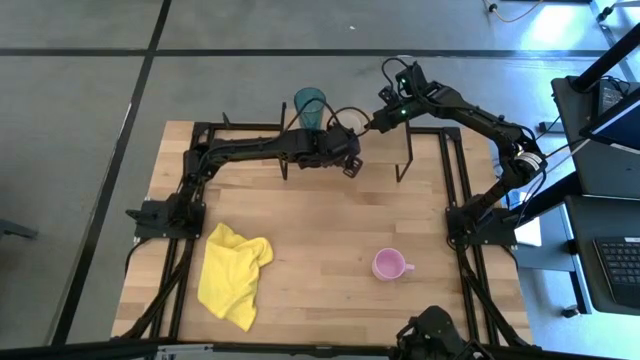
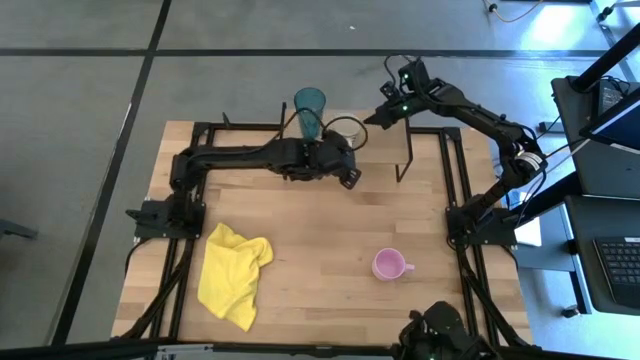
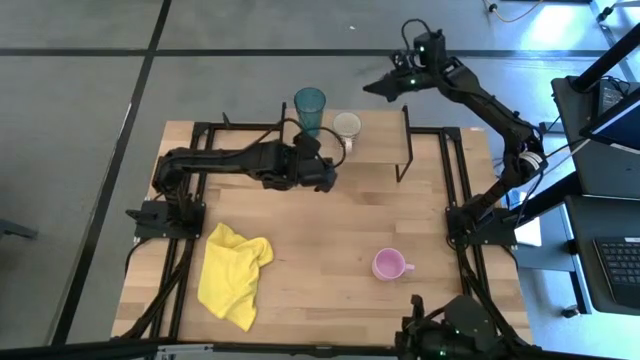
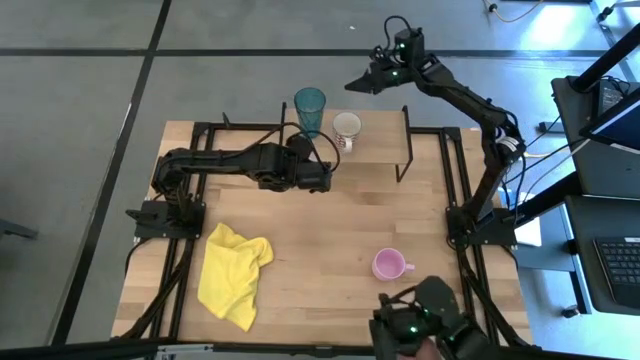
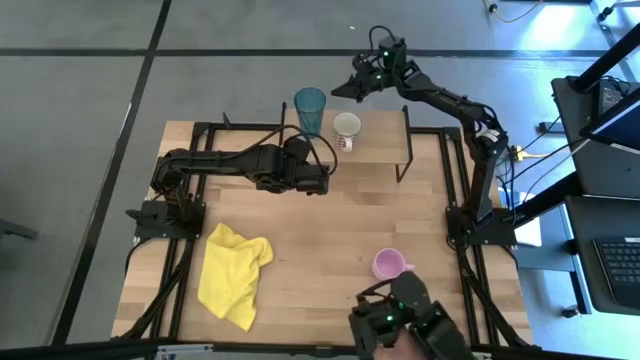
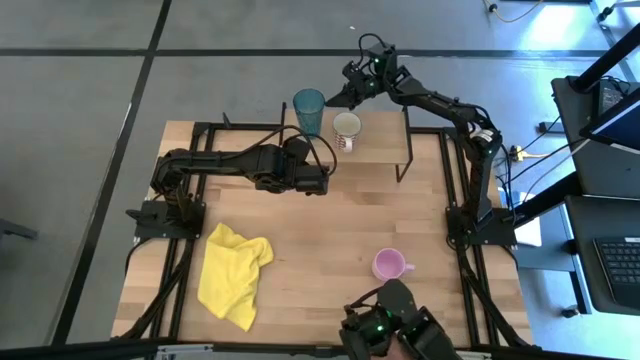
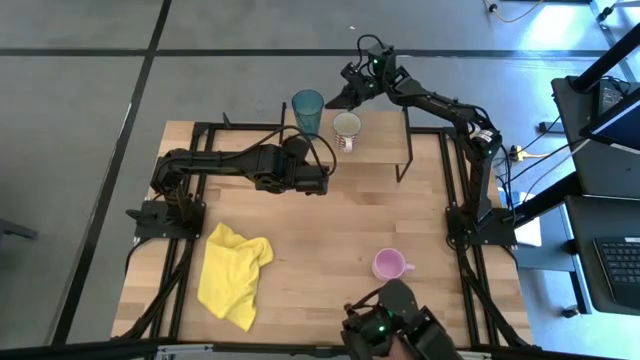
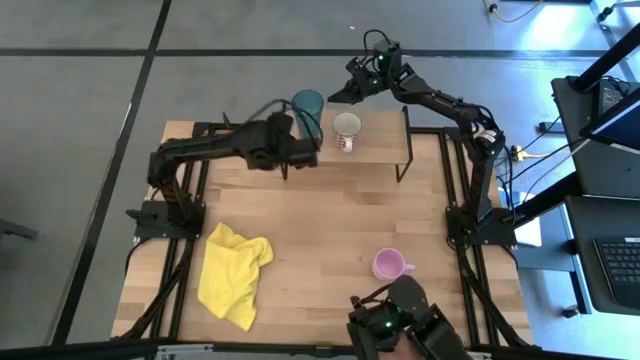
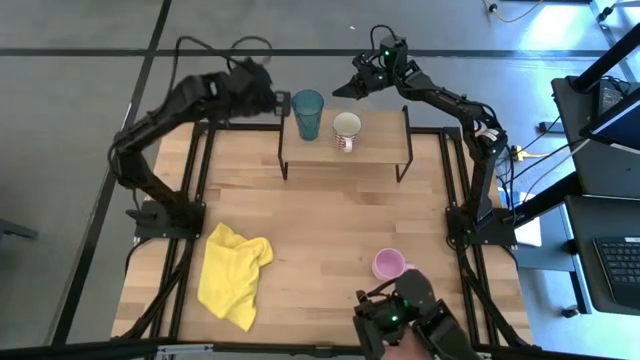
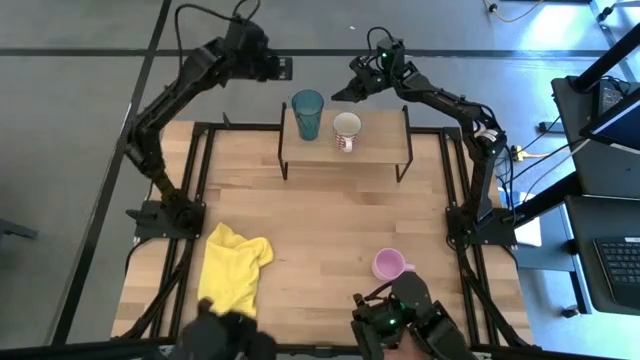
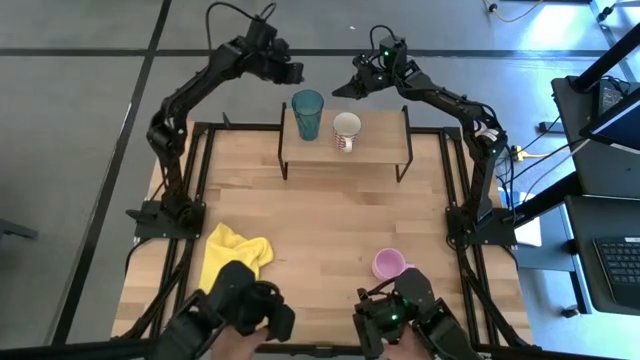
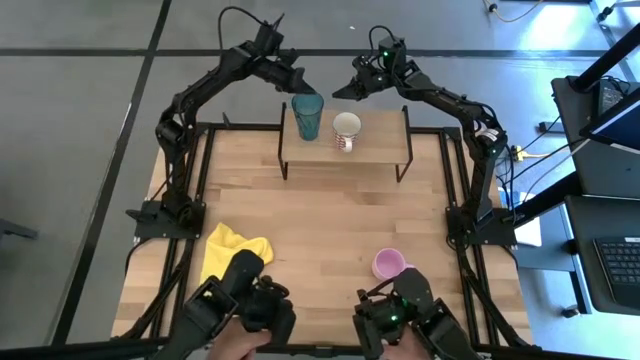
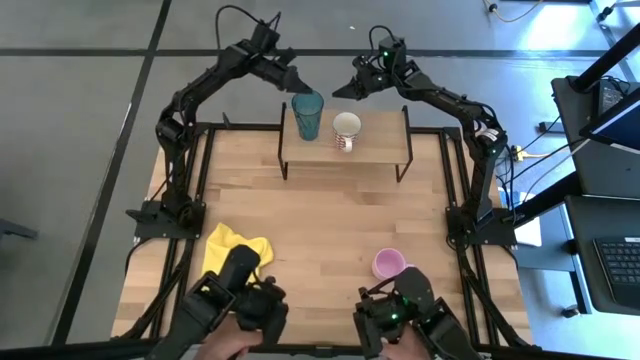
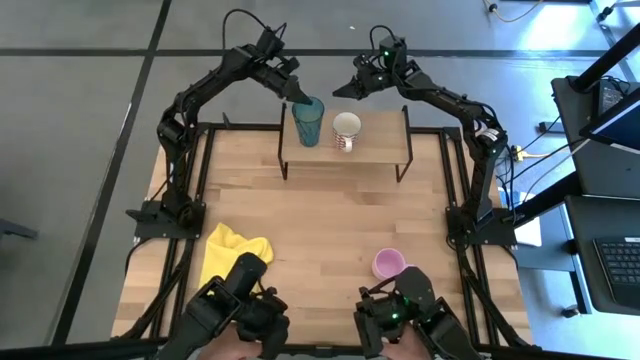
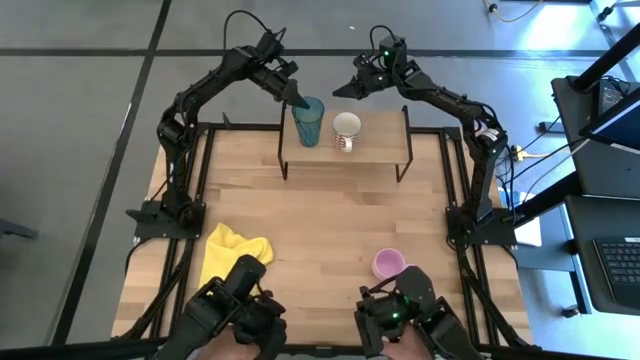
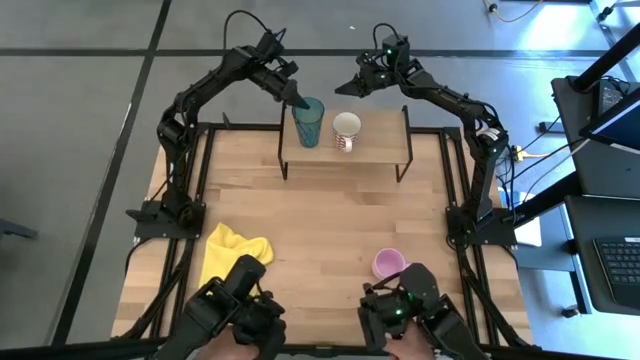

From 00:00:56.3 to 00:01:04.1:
Task: Stack small to large cups/mugs on shelf
Adjust the blue cup on the shelf

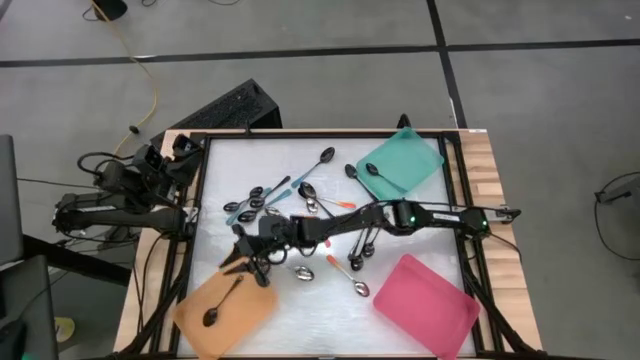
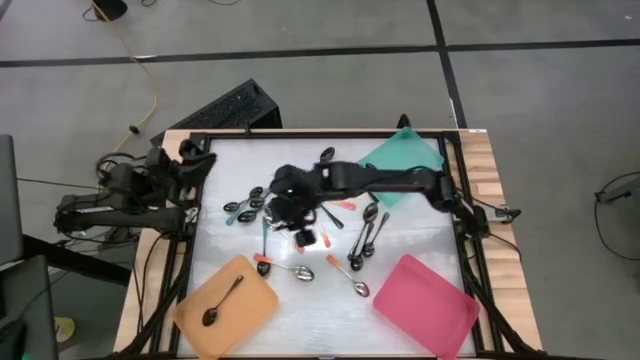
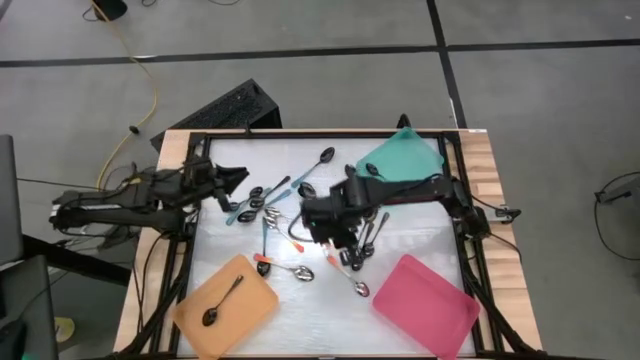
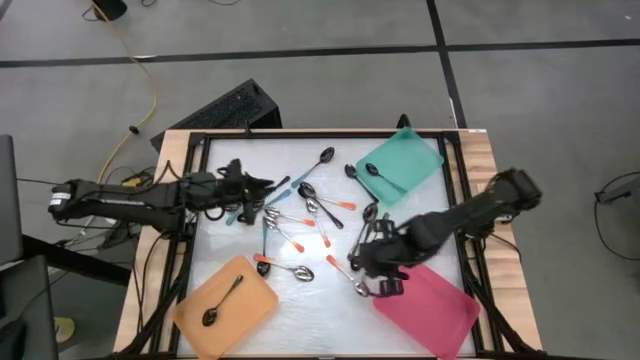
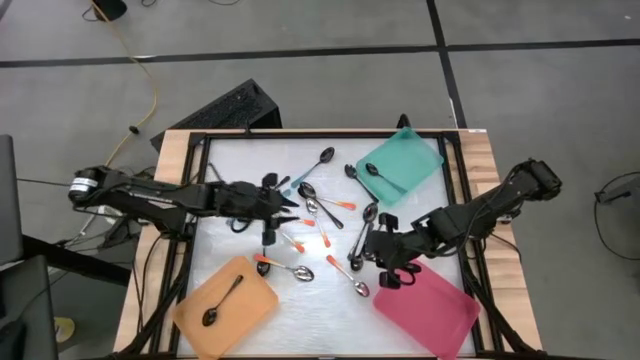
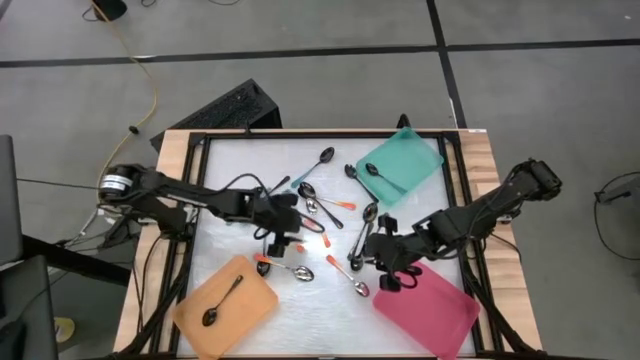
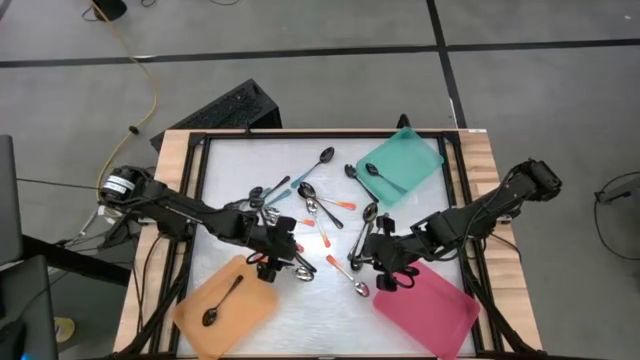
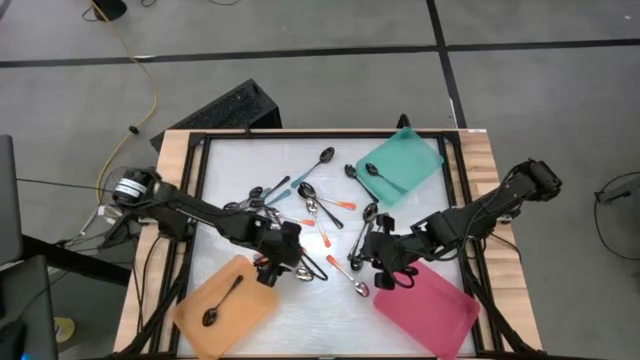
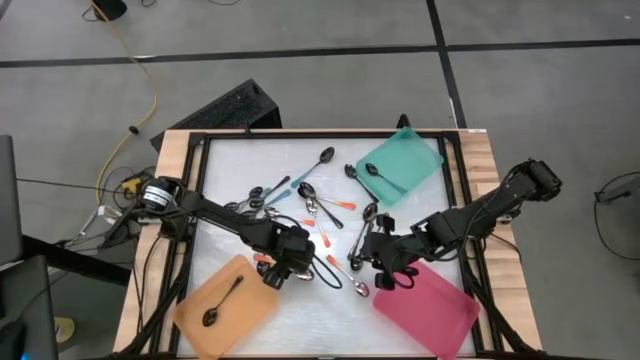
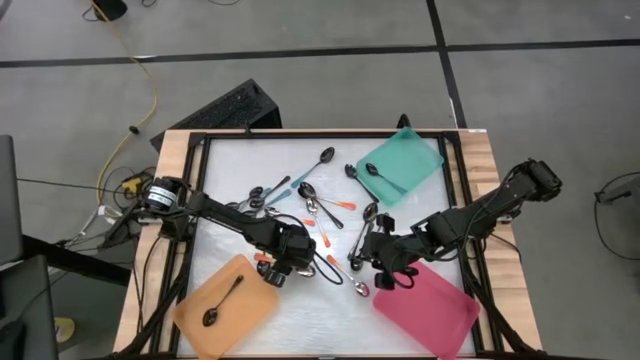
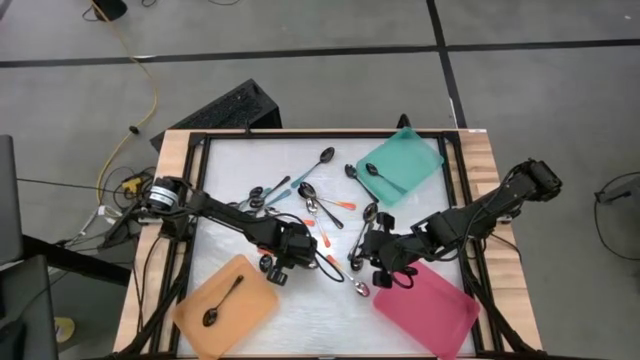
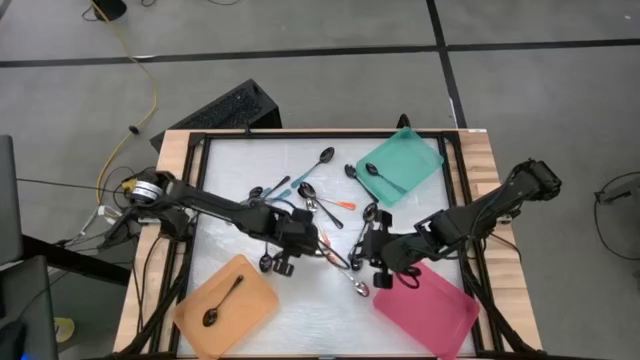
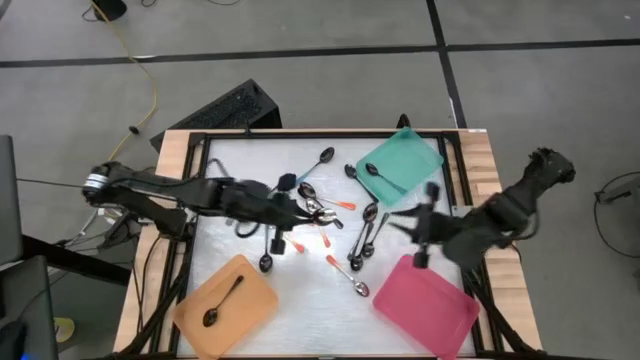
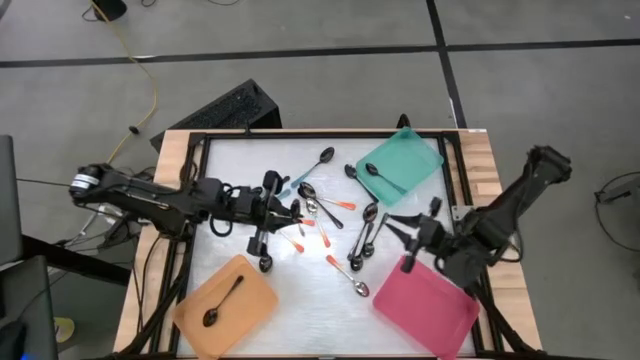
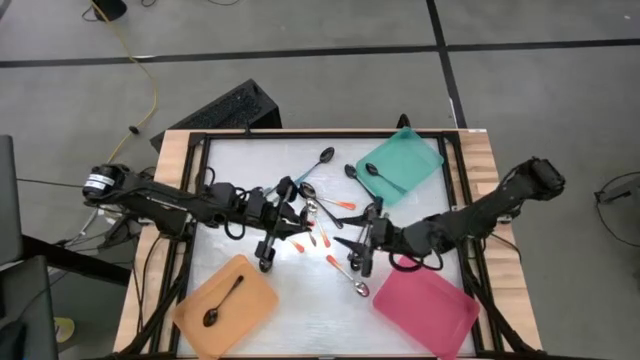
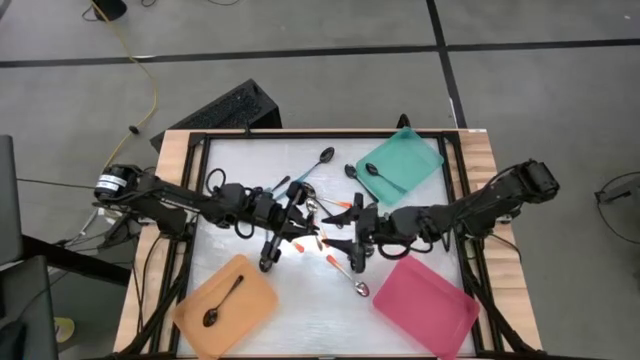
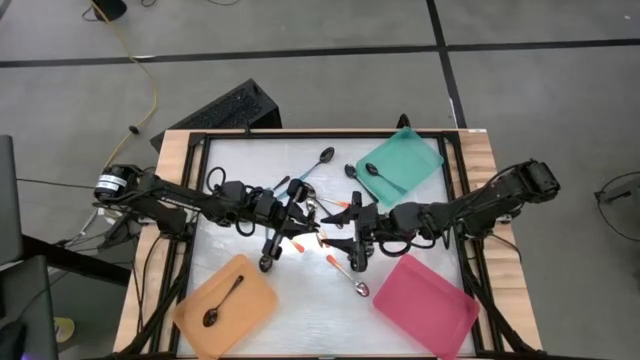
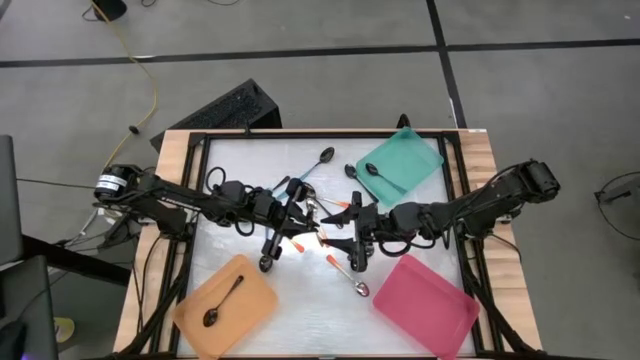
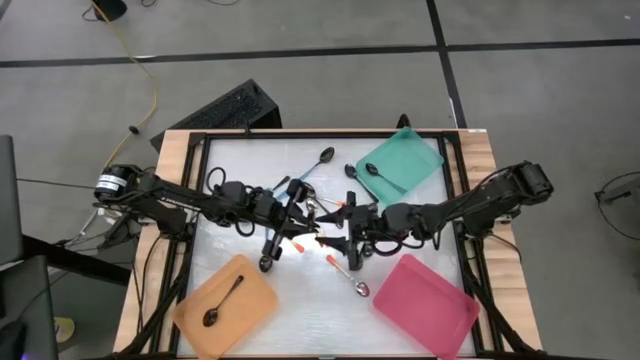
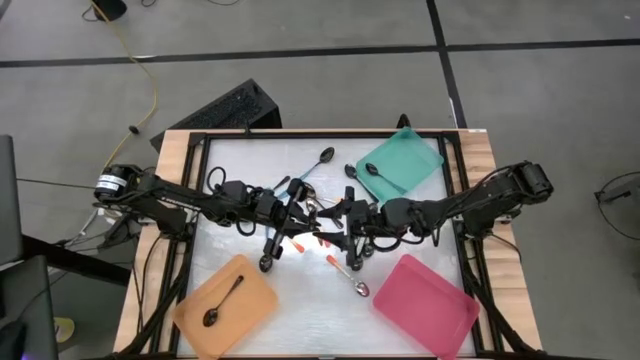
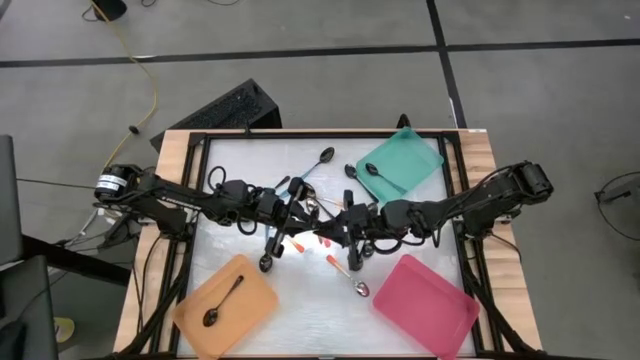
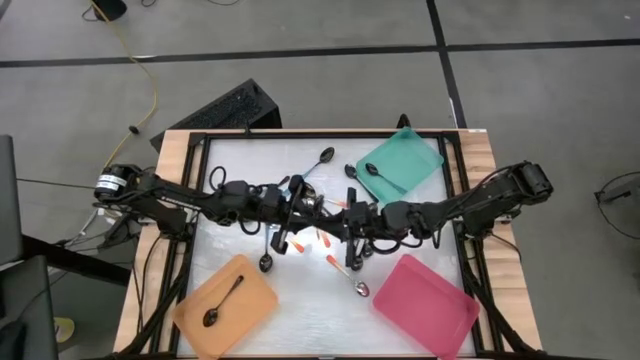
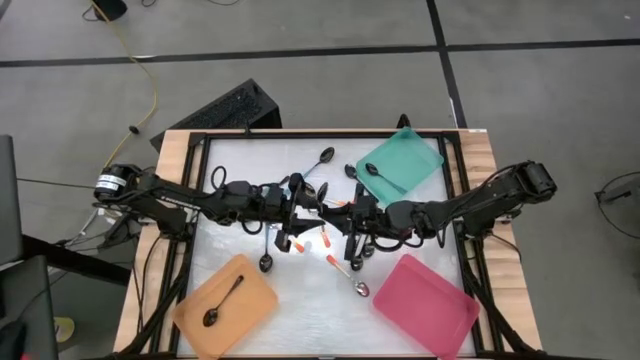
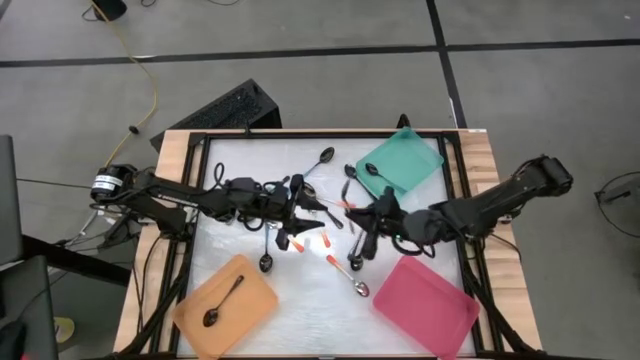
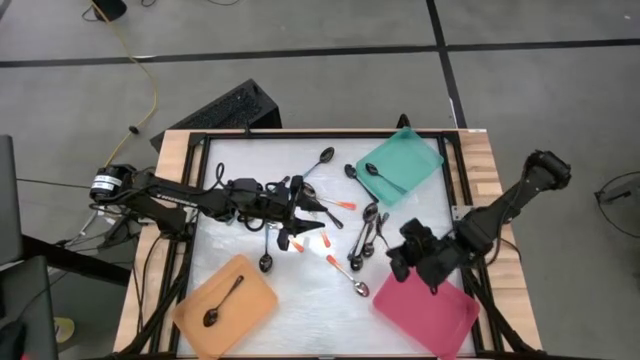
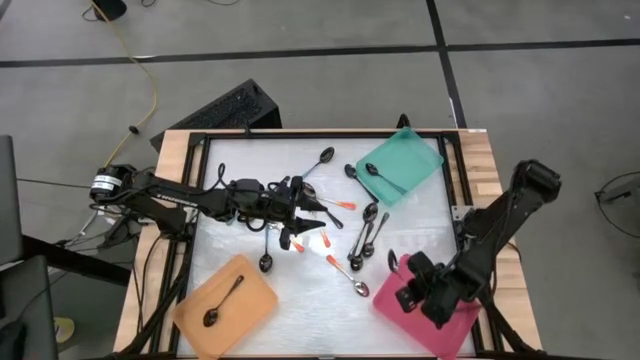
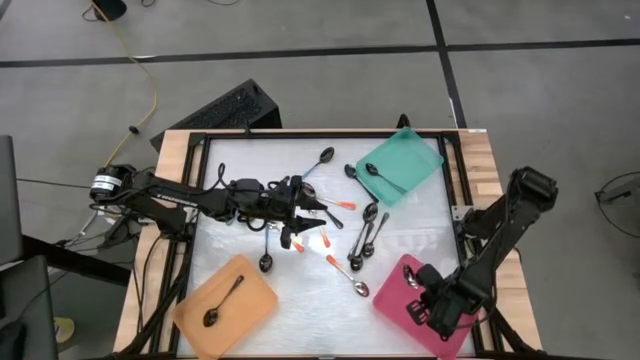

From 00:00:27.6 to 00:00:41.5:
Task: Sort silverware by color (type)
Put the orange spoon into the red bin
